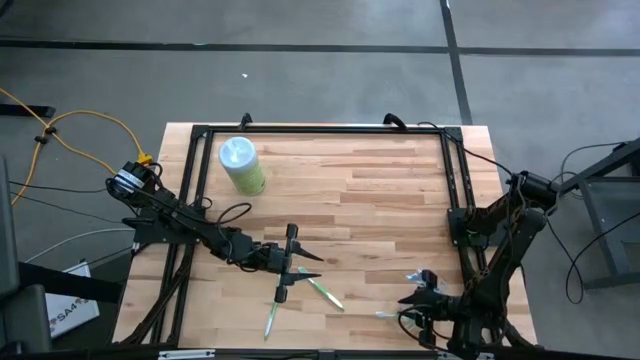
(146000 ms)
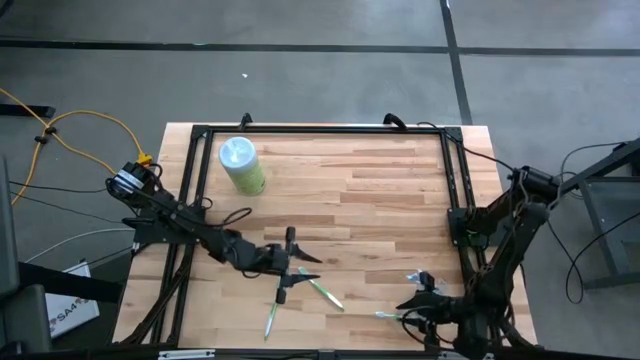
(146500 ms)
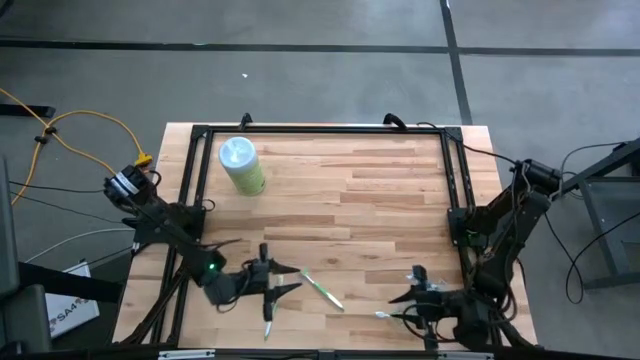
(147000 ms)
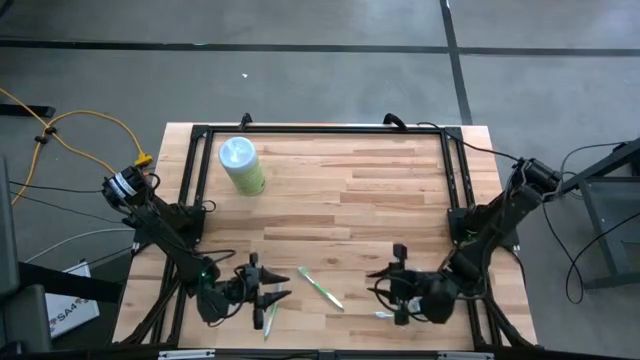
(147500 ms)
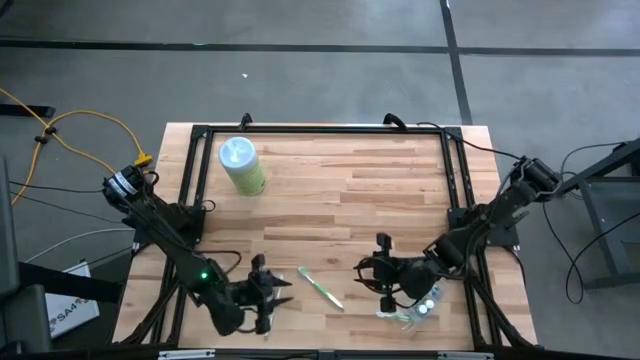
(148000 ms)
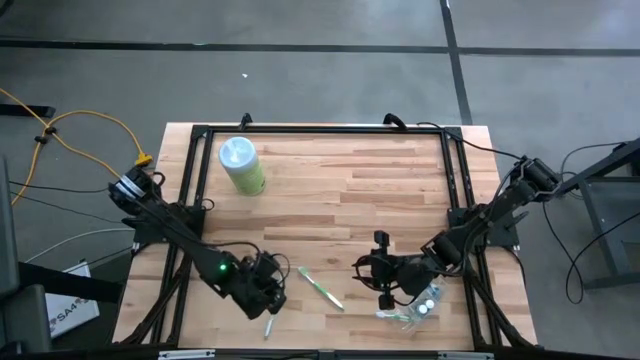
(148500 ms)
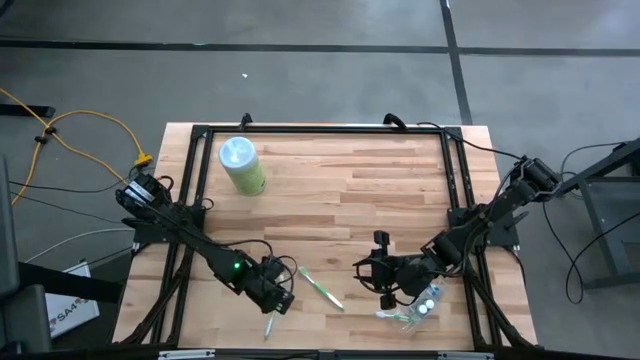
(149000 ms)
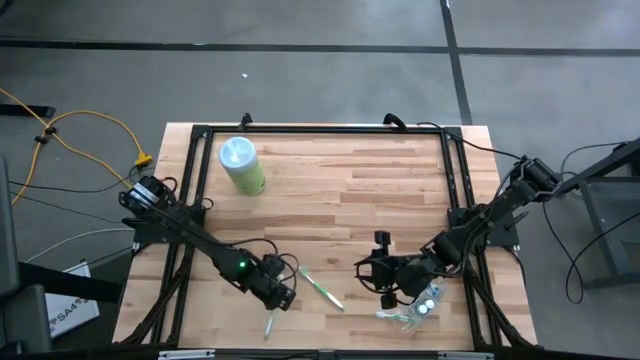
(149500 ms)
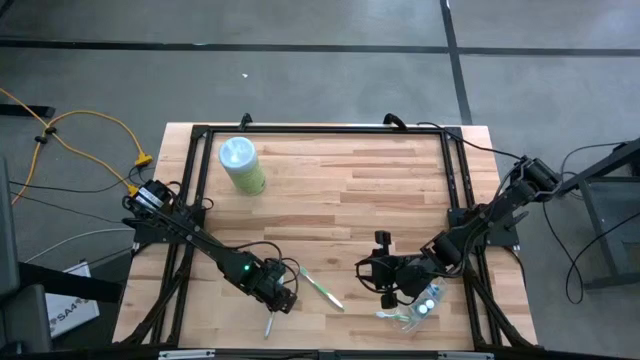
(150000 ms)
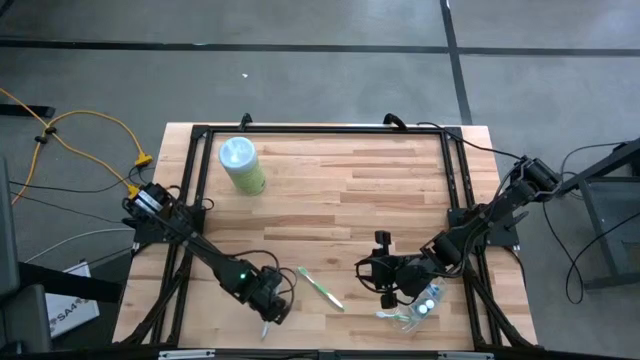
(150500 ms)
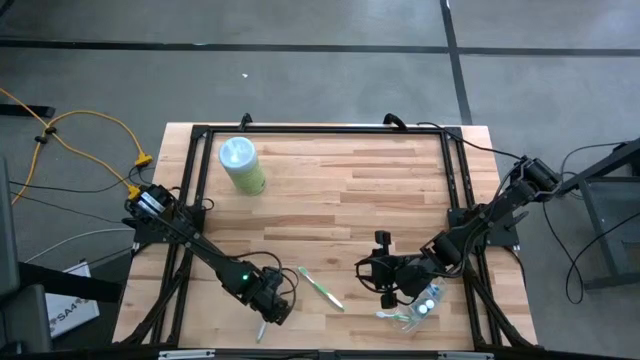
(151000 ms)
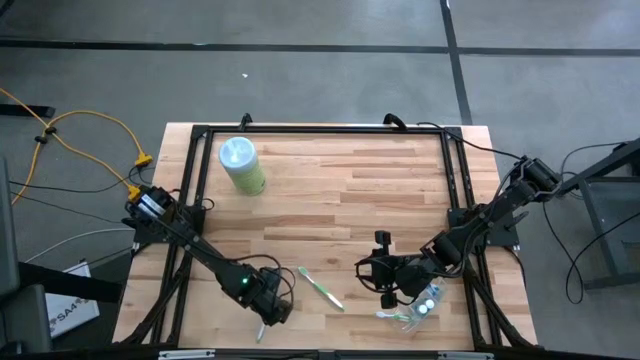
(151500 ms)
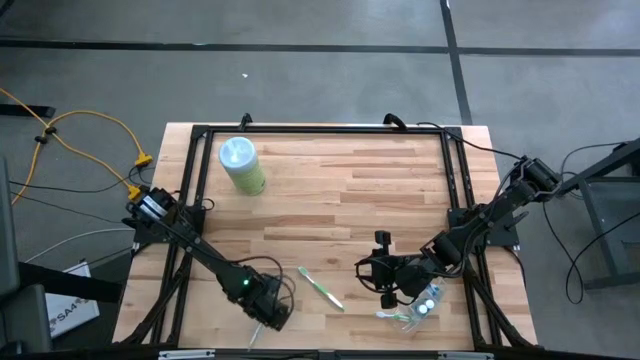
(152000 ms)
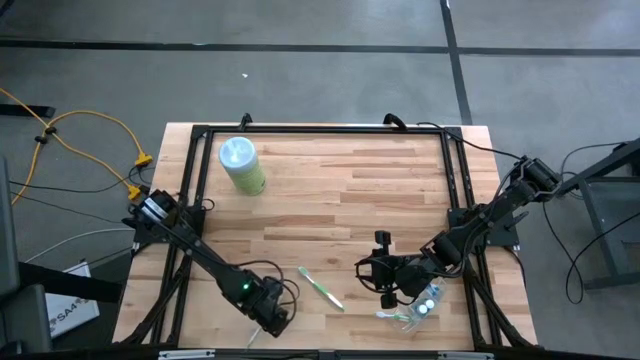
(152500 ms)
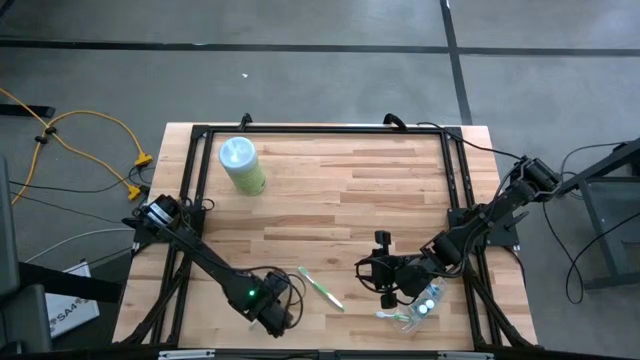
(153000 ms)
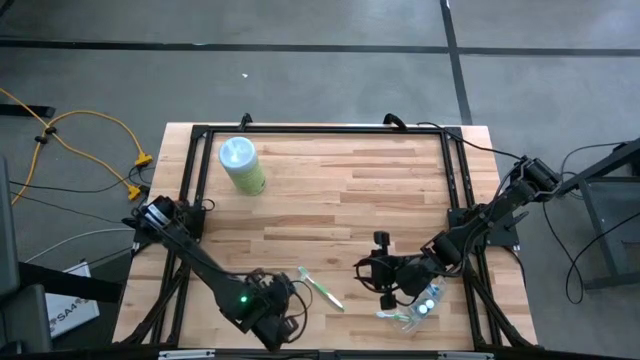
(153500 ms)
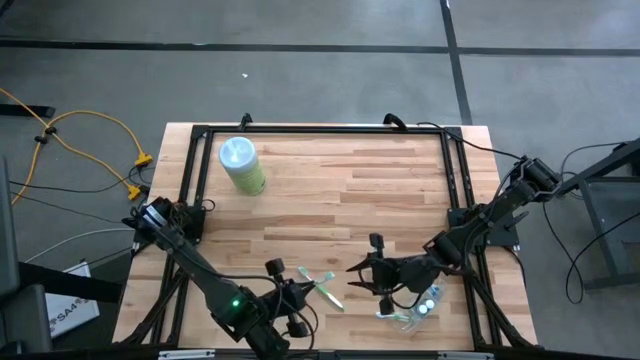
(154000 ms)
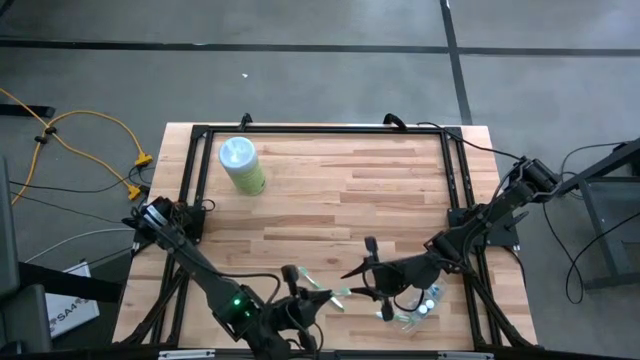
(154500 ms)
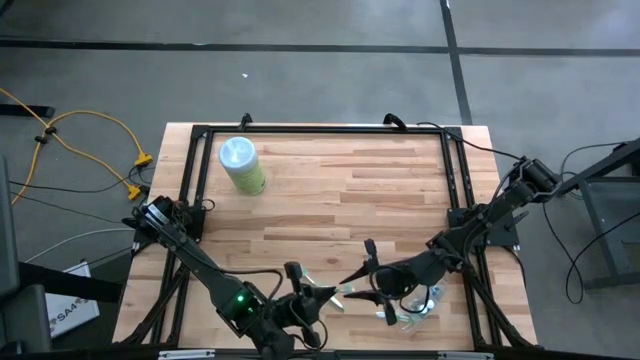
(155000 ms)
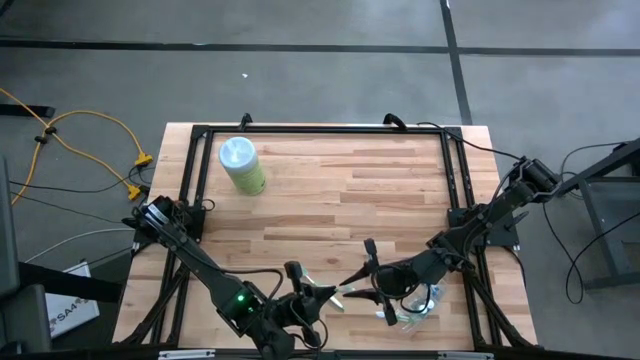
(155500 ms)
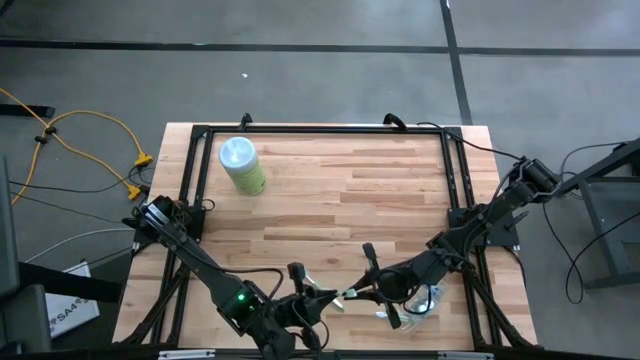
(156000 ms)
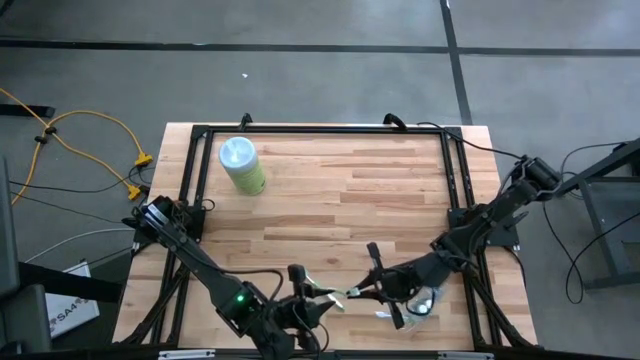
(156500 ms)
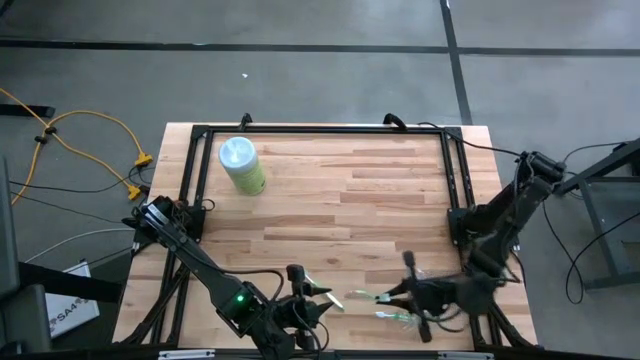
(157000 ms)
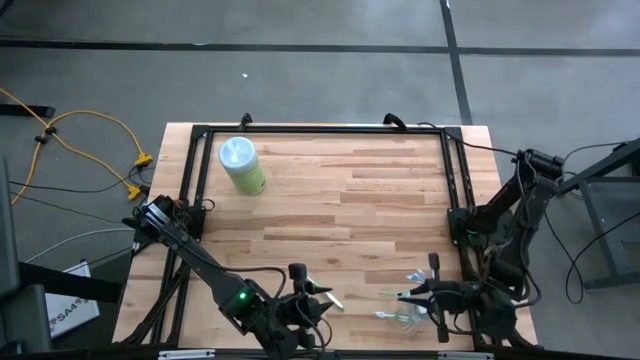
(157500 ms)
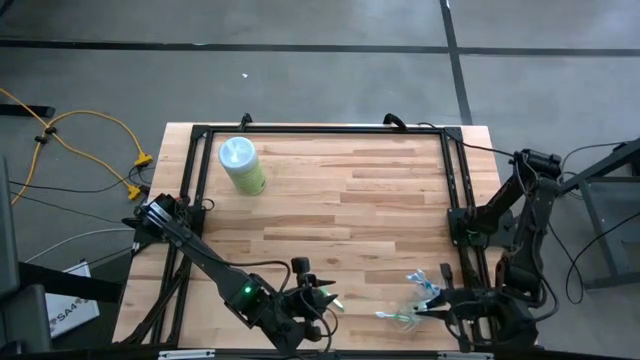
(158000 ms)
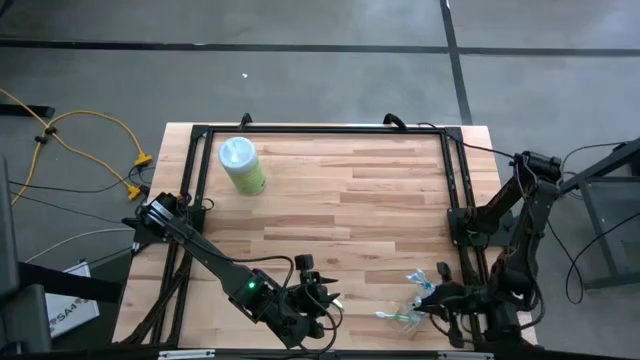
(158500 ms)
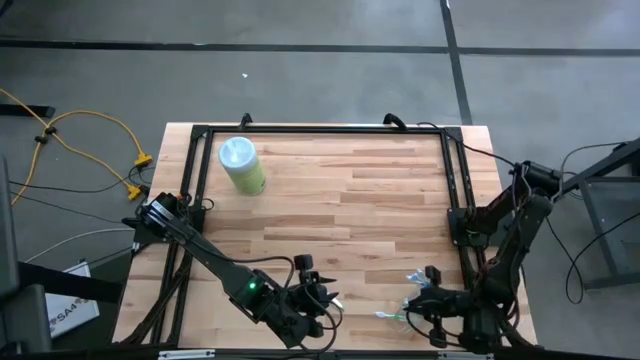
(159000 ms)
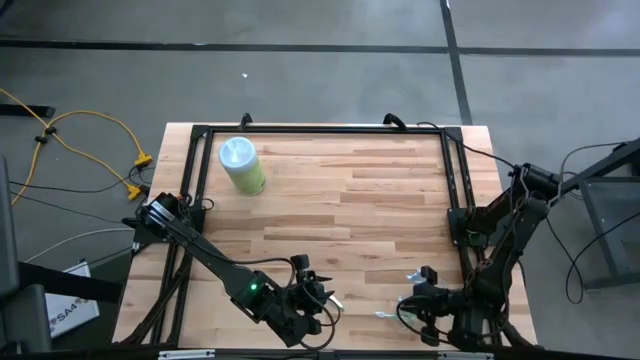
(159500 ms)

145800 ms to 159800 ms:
Task: Pick & Place toothbrushing station
Put the left green toothbrush into the left section of the transparent organizer

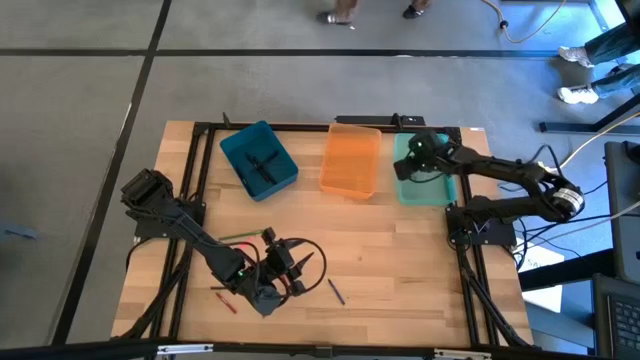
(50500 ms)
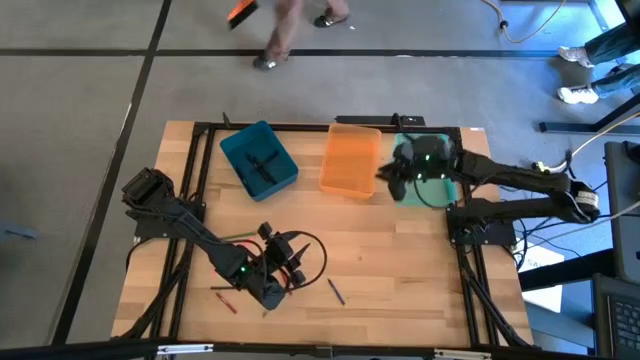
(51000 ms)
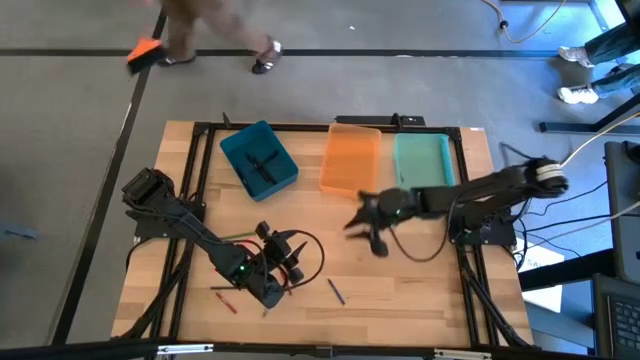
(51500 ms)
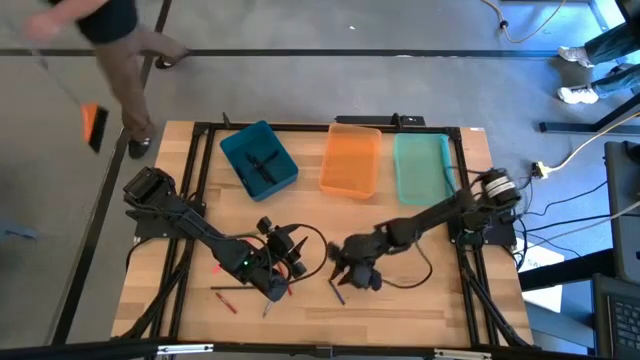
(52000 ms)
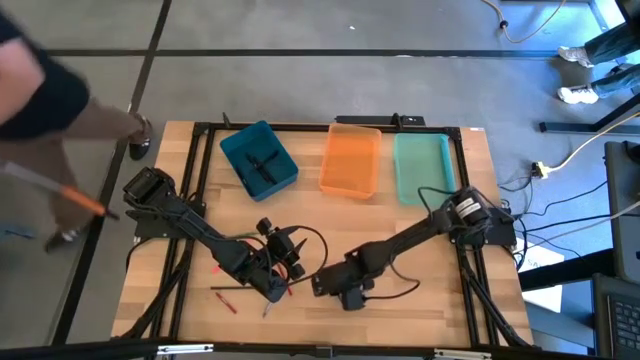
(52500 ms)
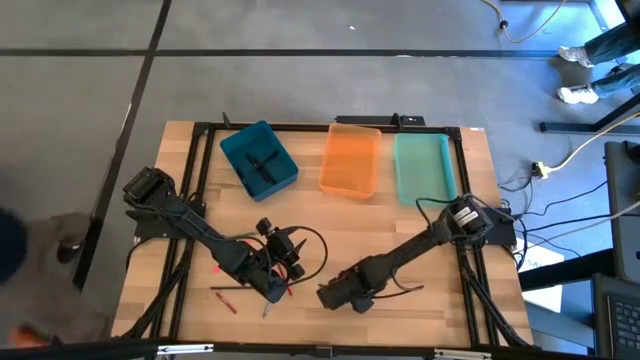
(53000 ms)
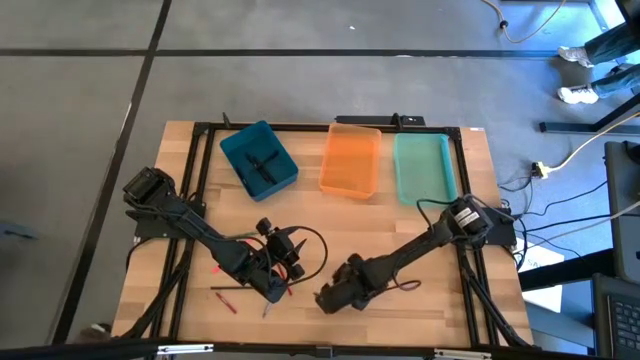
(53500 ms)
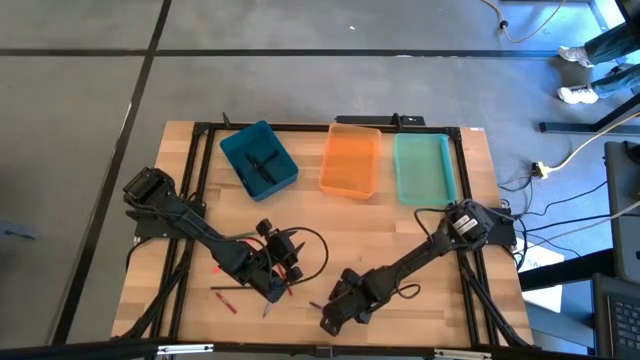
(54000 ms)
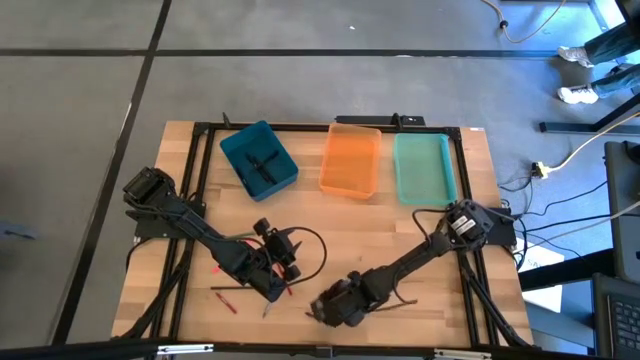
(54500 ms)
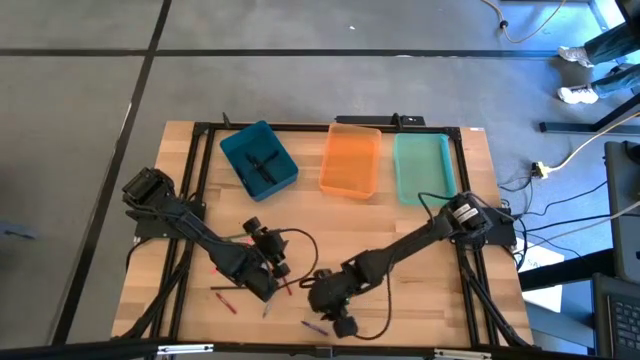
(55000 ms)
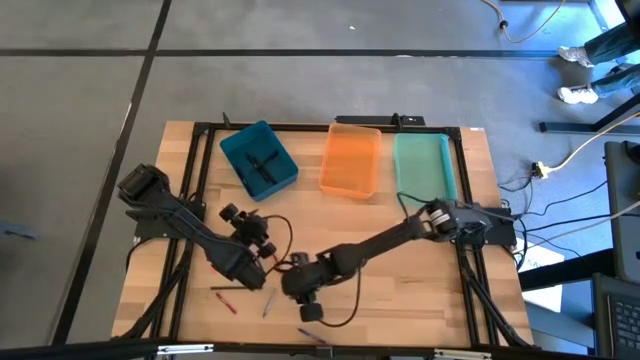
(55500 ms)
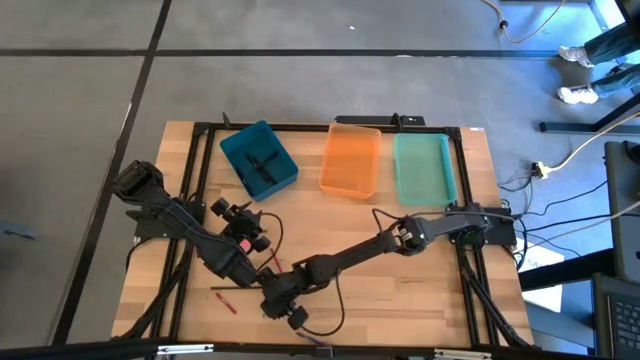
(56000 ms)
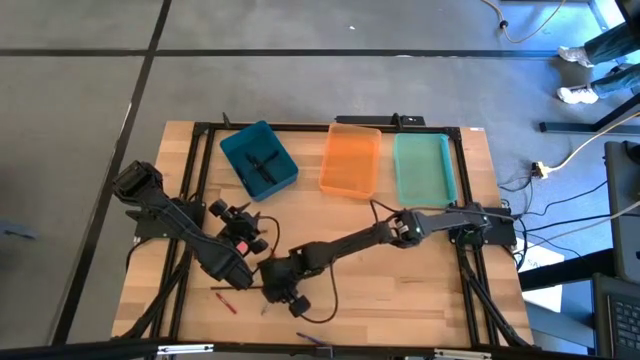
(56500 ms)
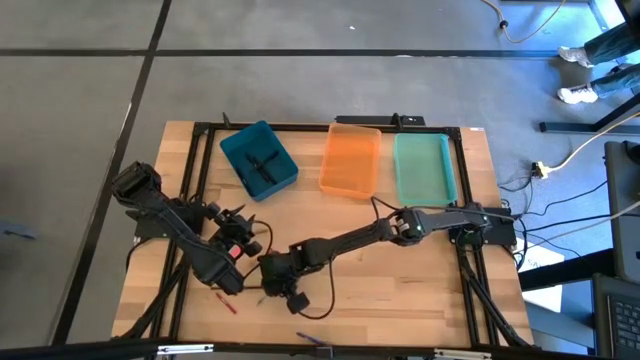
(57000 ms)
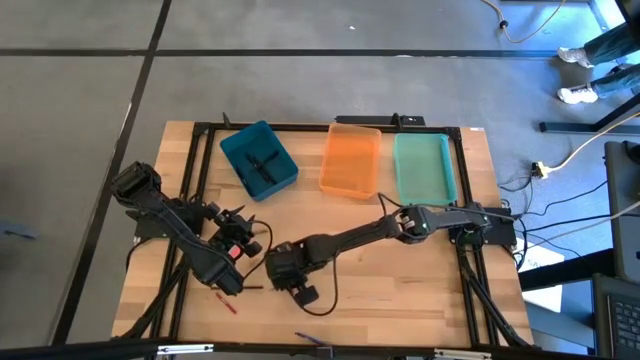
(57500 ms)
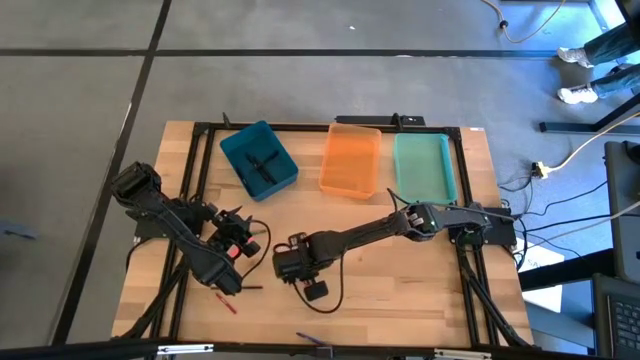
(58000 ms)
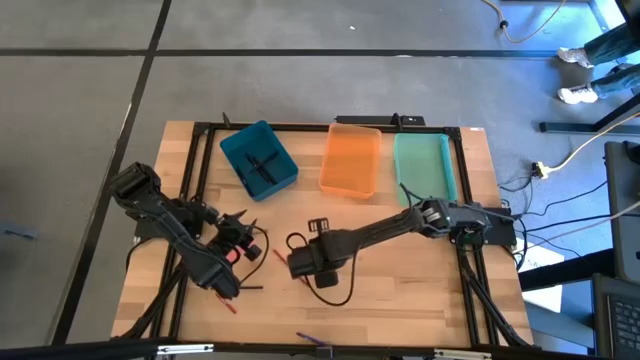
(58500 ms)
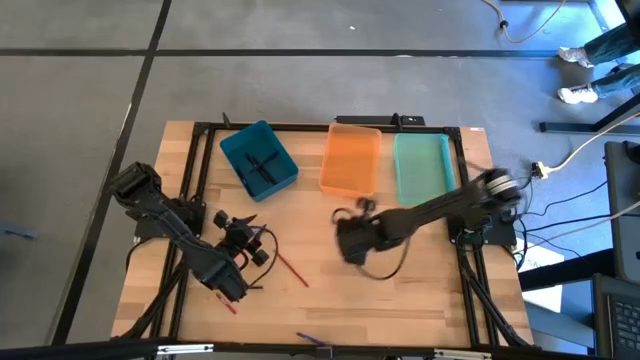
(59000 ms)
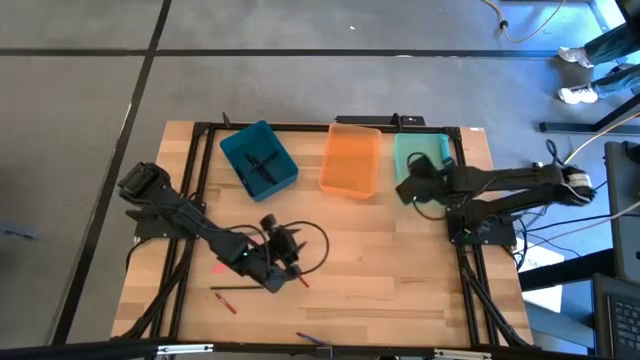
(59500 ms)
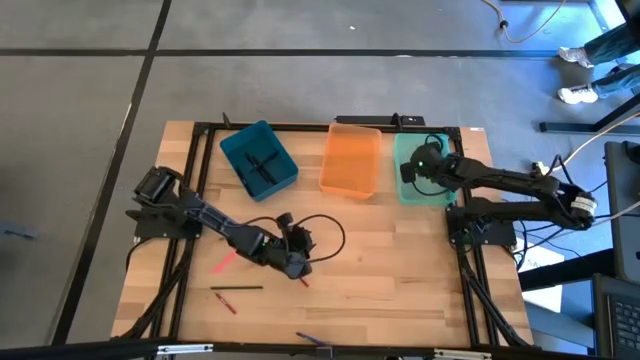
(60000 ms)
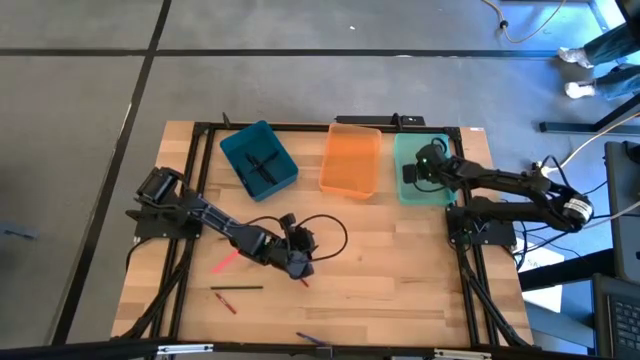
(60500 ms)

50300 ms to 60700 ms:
Task: Sort crayons/erasers/pens/pencils in bins
Put the gray crayon into the light blue bin
